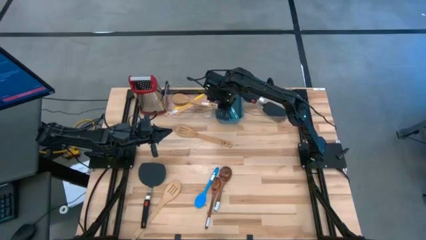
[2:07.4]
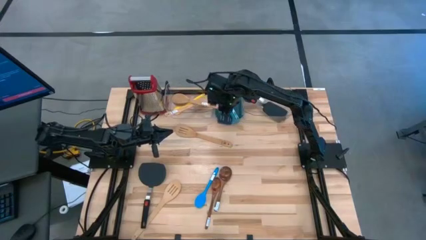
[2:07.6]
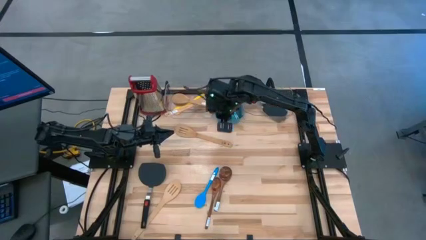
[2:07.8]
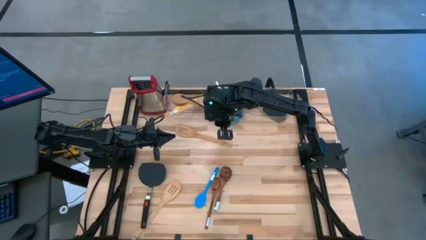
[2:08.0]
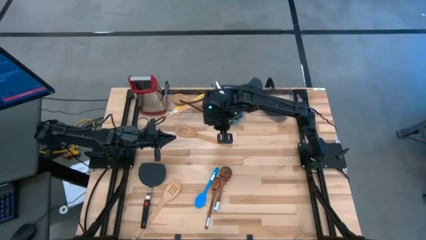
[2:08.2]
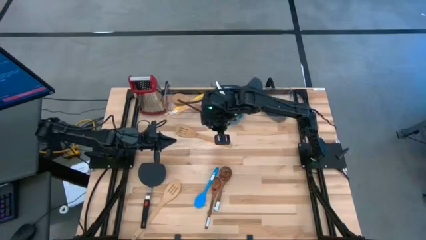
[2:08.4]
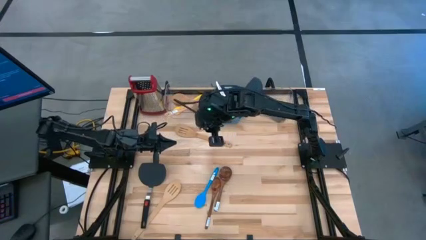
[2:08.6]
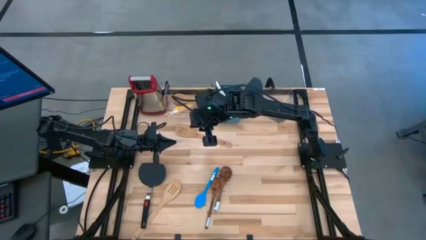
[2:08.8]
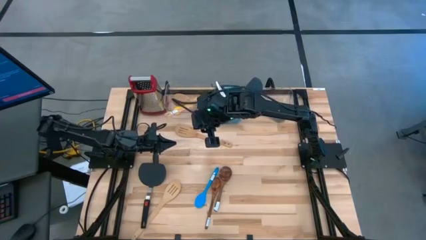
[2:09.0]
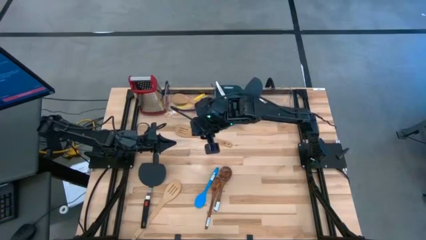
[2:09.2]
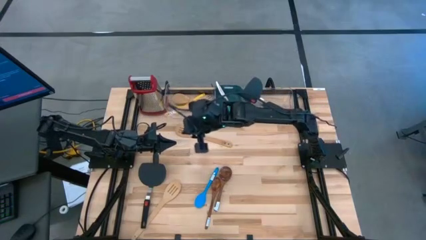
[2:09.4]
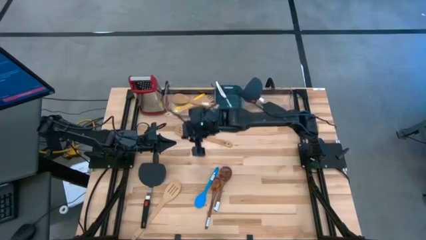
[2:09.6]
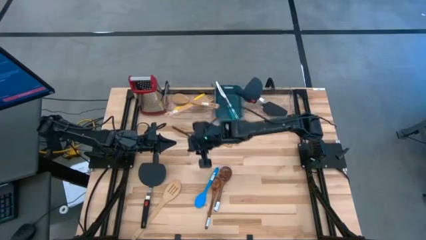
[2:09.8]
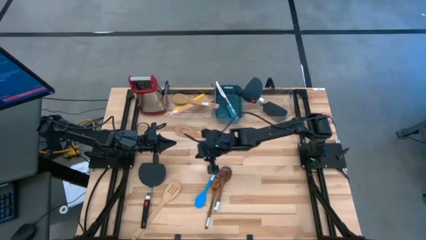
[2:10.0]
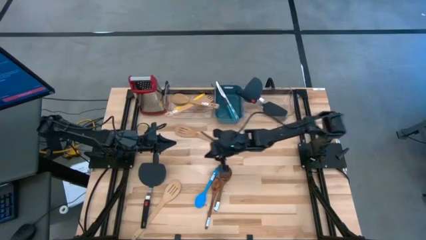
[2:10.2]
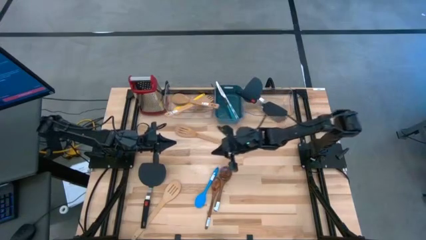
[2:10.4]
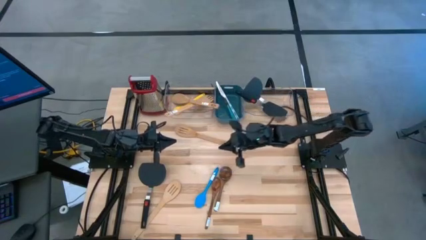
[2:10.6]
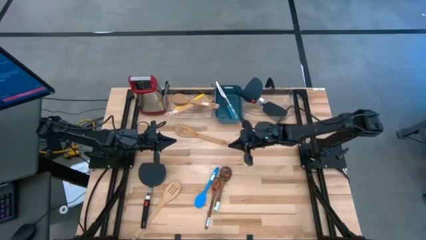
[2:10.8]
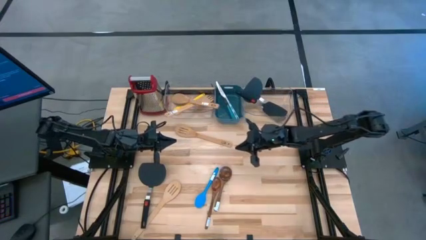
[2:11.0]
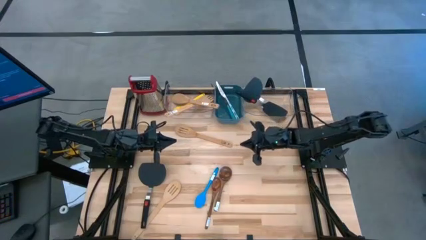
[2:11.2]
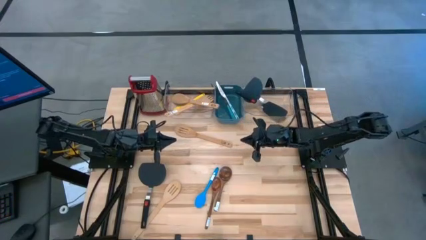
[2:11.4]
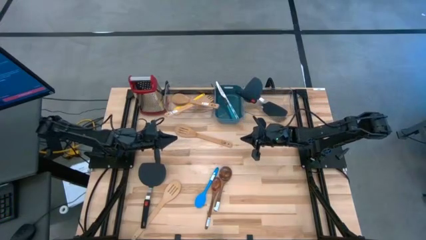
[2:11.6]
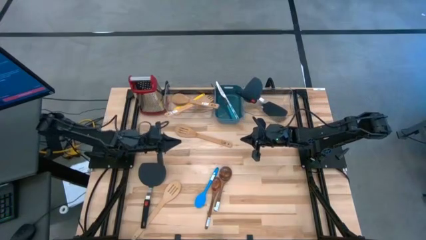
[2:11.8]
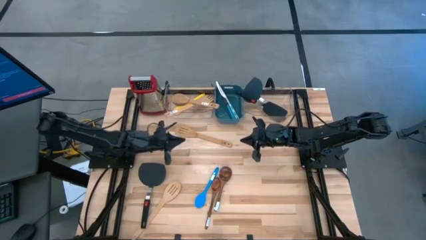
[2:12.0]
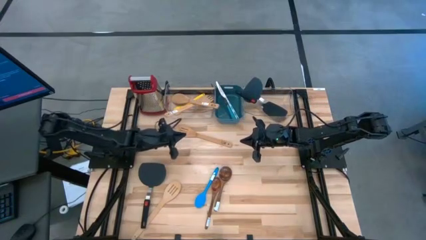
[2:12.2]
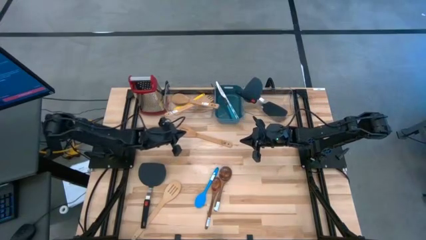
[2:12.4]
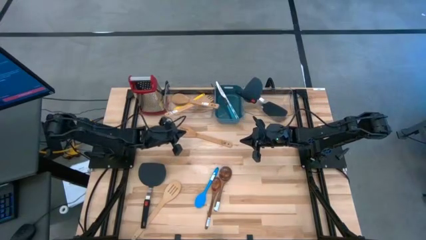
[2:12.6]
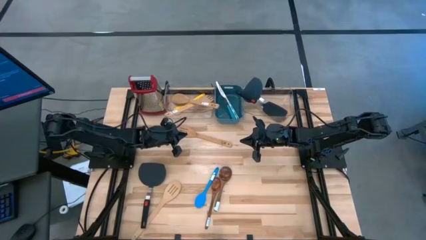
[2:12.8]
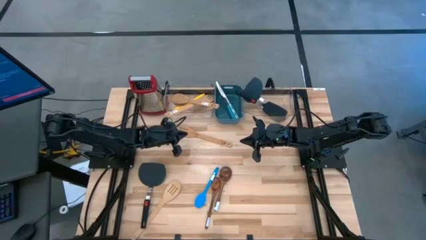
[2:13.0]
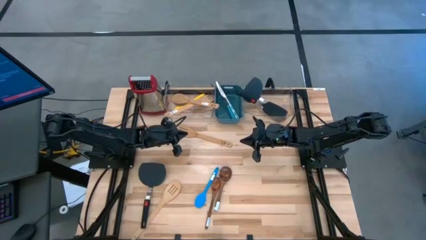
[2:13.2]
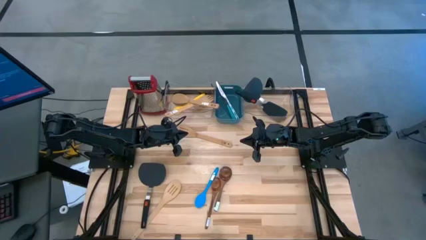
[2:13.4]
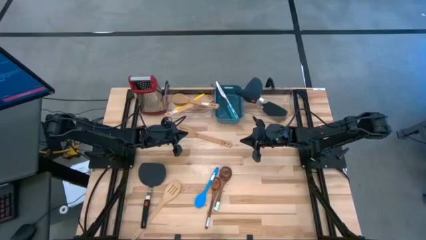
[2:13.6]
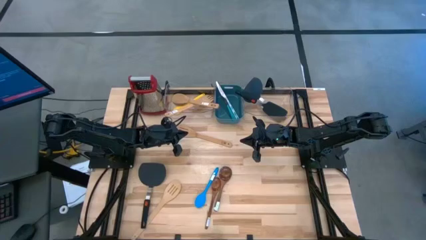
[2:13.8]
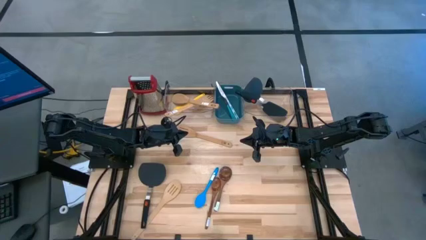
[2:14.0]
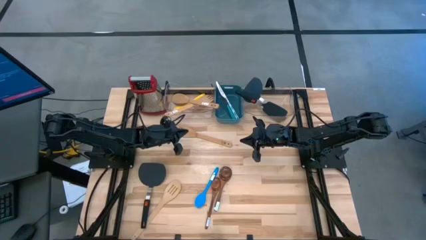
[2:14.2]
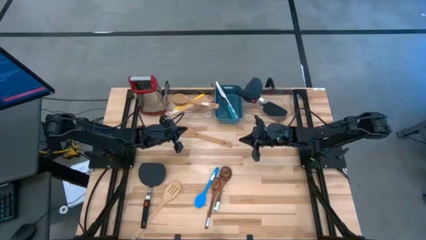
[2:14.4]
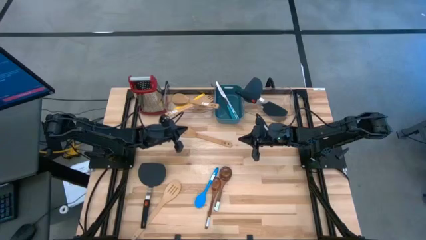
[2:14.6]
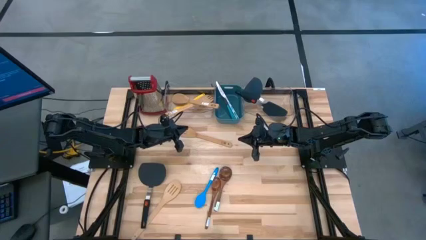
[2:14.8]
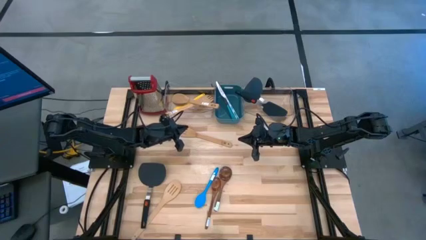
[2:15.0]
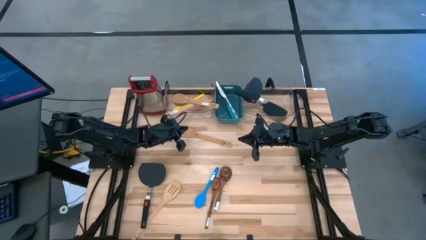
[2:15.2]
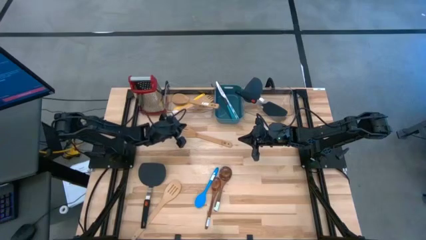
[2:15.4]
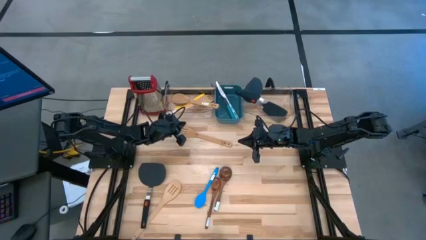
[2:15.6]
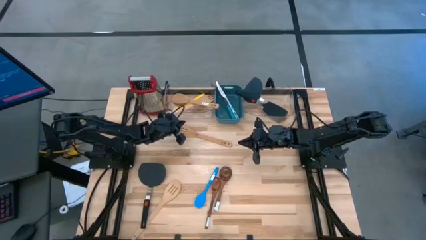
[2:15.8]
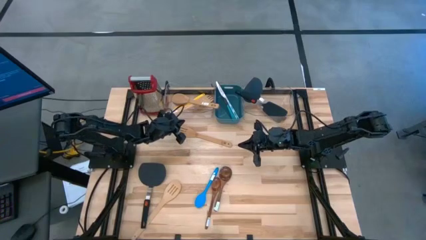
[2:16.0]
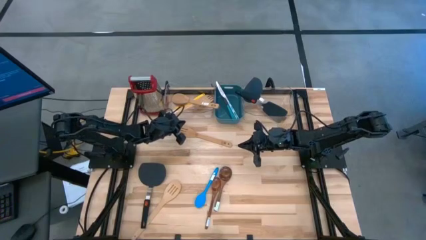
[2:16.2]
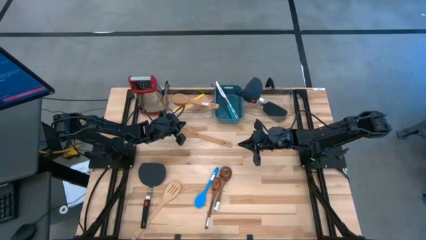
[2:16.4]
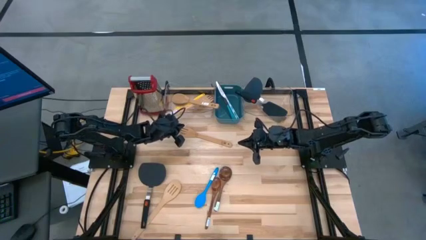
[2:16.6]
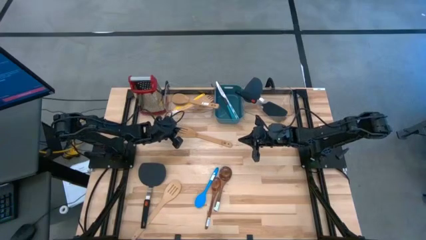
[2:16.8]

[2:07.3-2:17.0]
Task: Pick & Place Kitchen Items
Put the brown slotted spoon into the left transparent bin

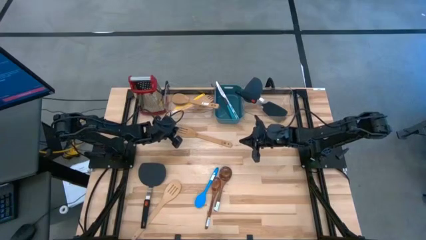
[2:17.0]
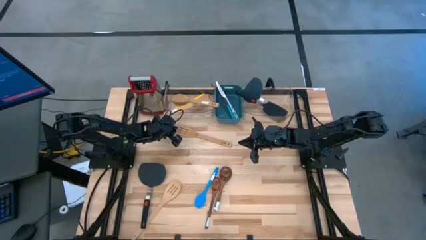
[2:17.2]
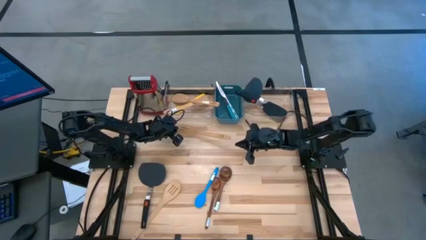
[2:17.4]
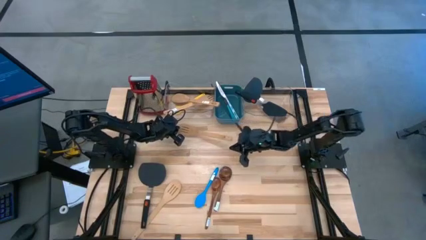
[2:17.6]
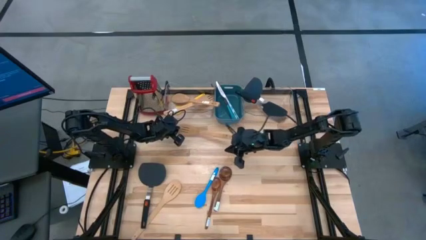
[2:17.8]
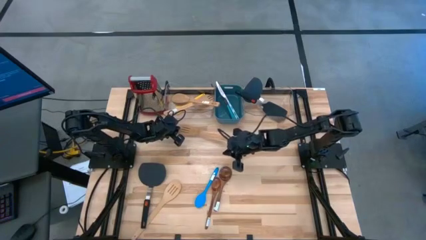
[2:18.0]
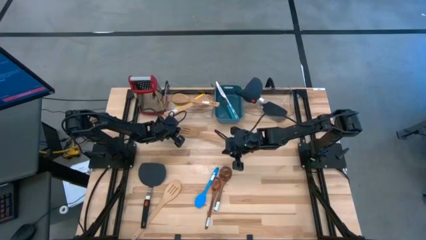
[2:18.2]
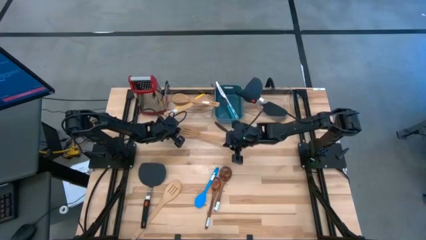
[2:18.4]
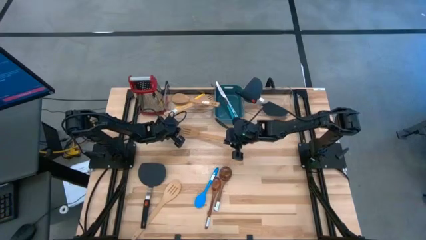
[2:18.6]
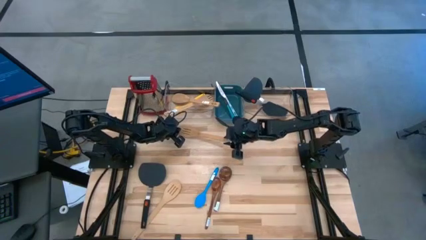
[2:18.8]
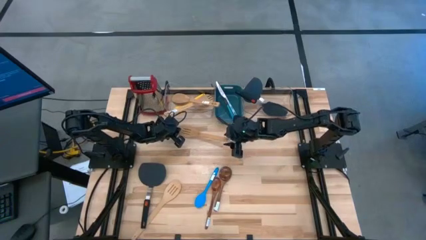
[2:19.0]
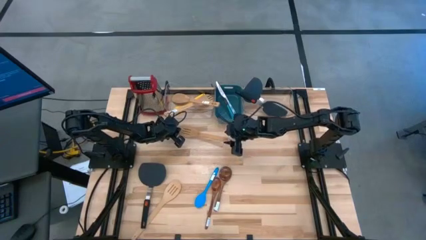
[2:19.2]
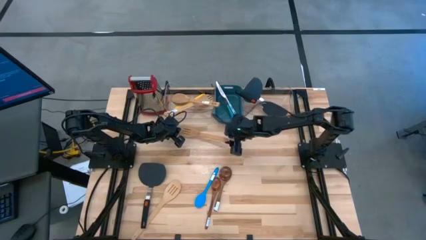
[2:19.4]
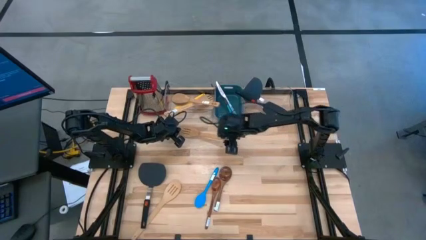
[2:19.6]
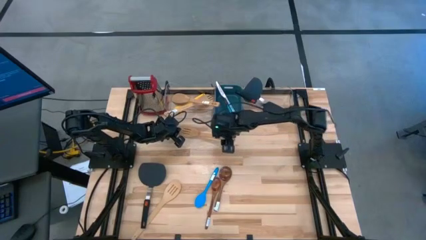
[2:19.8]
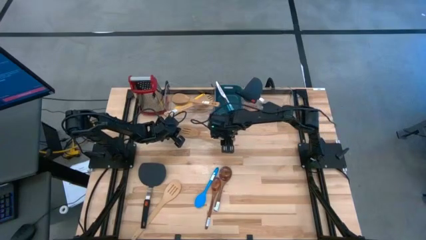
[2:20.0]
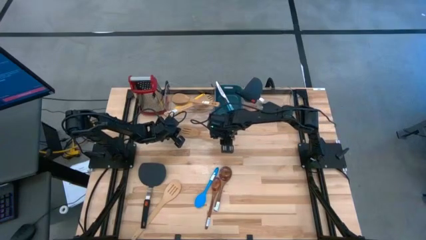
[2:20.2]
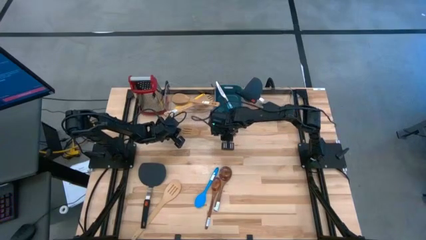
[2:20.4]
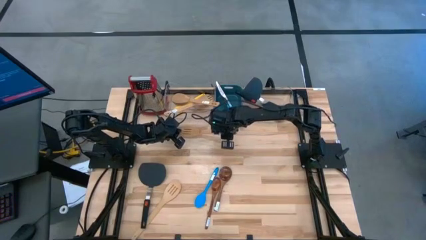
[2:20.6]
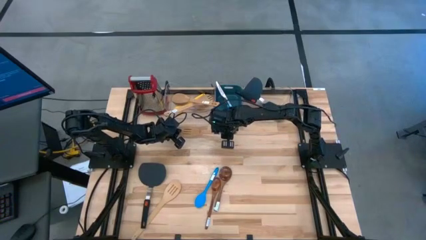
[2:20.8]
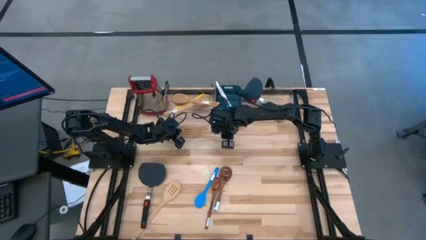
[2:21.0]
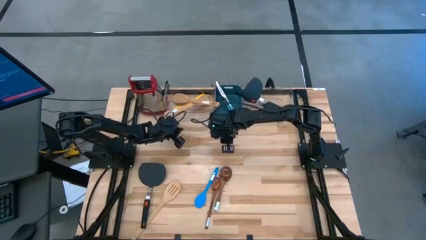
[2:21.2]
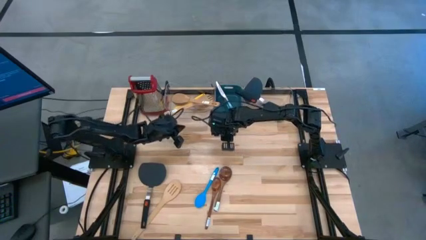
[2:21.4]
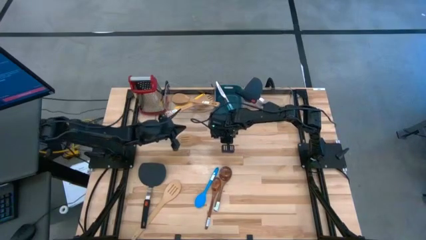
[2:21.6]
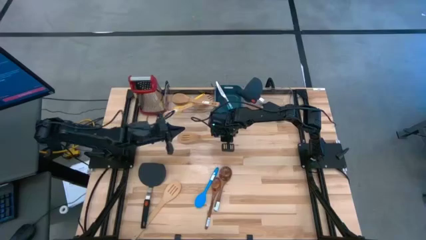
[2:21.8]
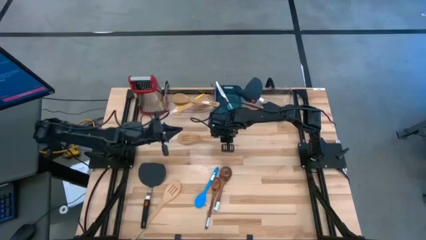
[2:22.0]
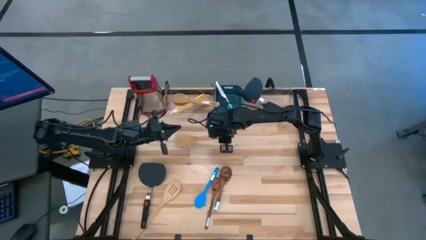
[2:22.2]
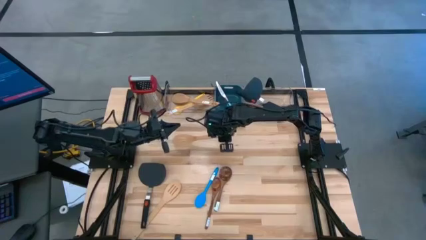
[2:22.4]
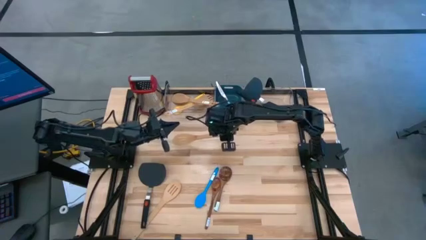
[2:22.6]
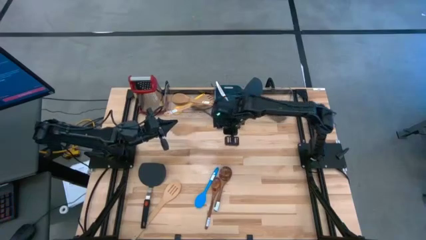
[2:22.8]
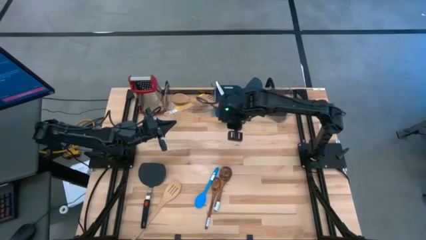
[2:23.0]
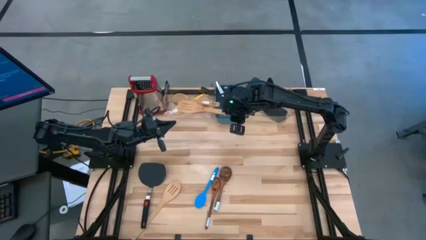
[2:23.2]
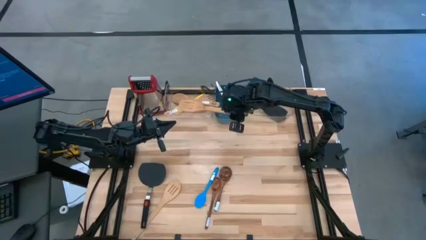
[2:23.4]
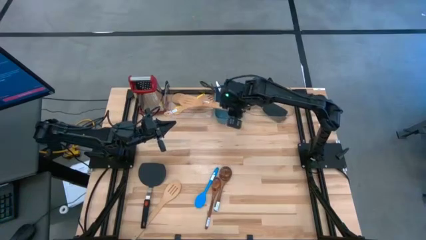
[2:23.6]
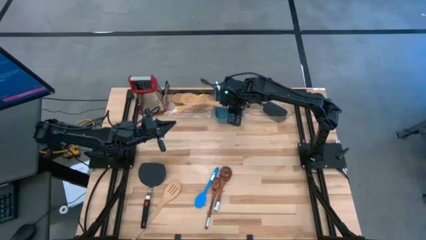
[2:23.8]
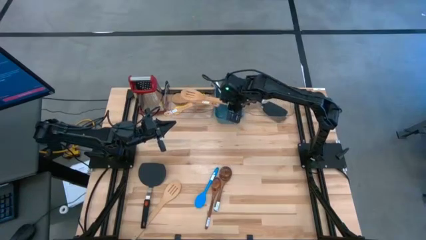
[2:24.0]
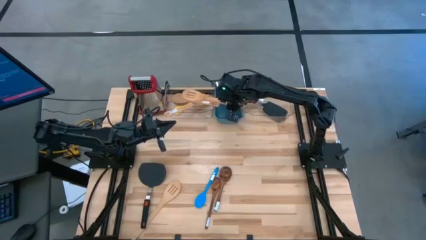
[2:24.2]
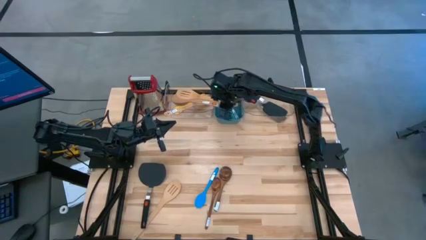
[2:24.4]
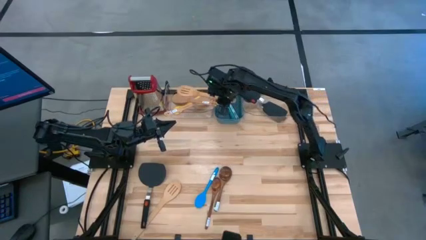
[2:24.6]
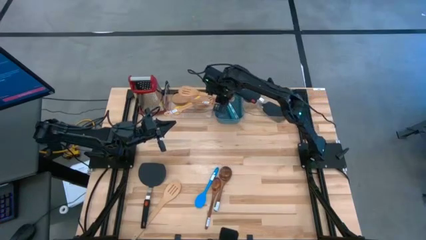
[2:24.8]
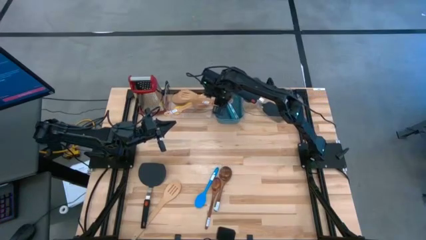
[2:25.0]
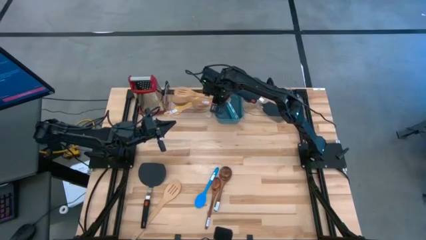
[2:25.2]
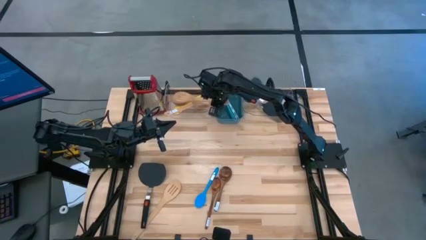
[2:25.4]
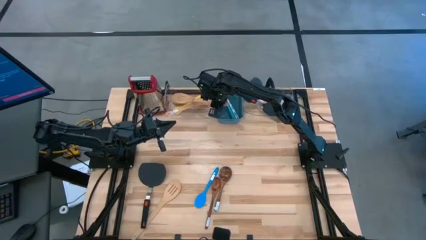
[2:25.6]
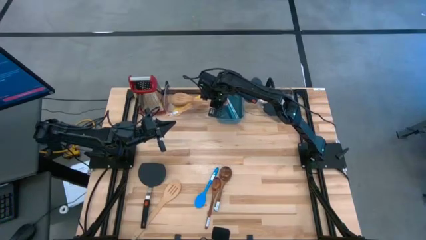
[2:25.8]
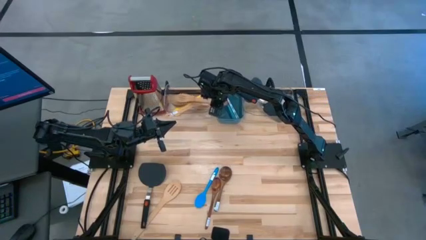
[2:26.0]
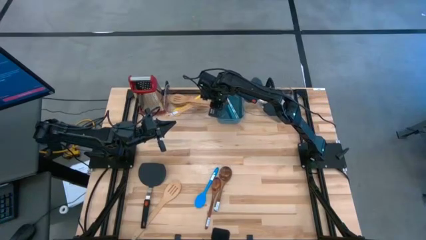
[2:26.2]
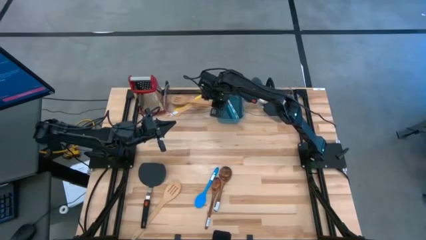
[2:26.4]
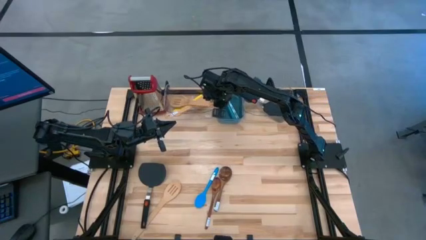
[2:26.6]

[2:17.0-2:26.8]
Put the brown slotted spoon into the left transparent bin
